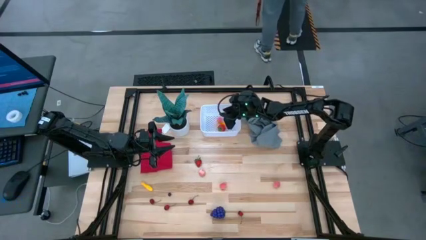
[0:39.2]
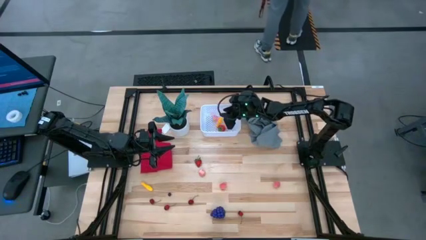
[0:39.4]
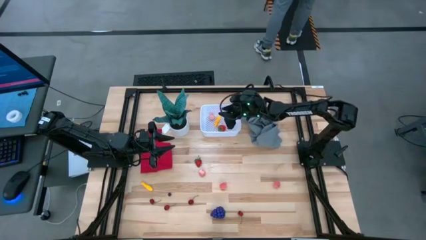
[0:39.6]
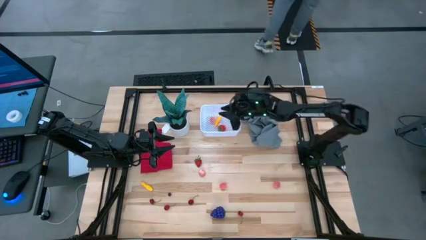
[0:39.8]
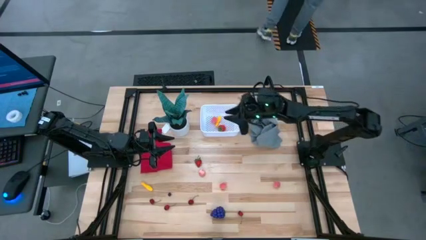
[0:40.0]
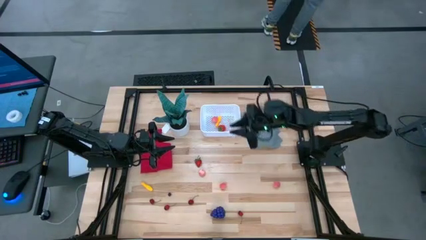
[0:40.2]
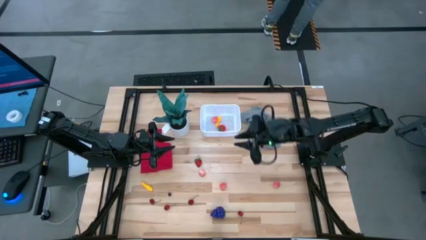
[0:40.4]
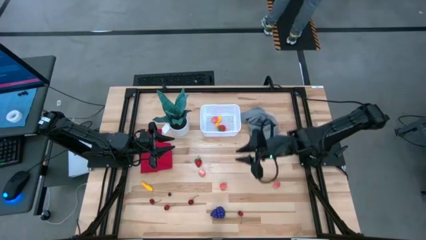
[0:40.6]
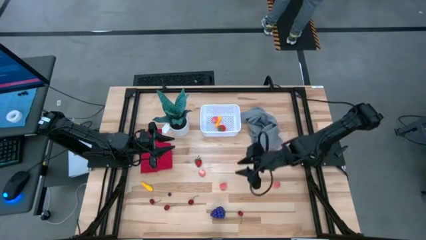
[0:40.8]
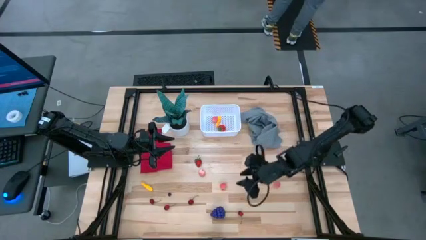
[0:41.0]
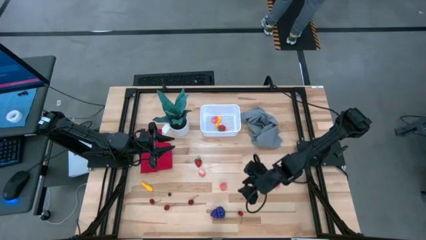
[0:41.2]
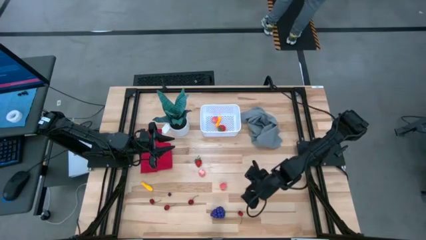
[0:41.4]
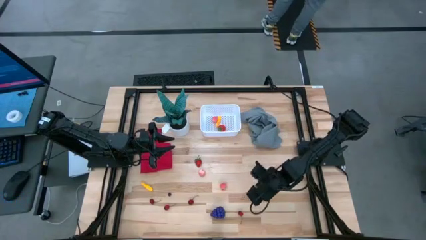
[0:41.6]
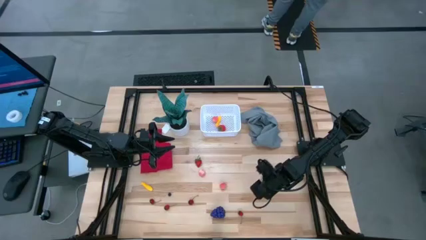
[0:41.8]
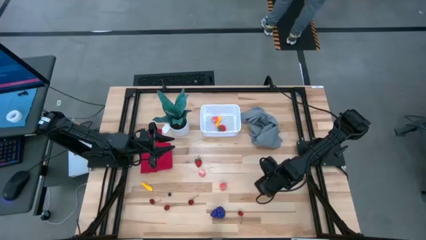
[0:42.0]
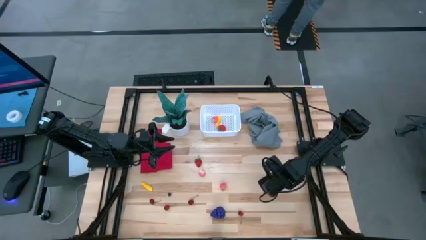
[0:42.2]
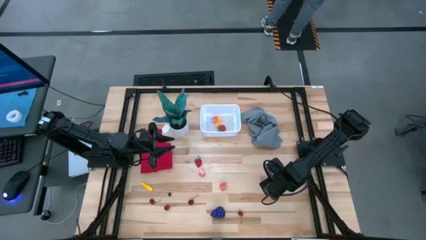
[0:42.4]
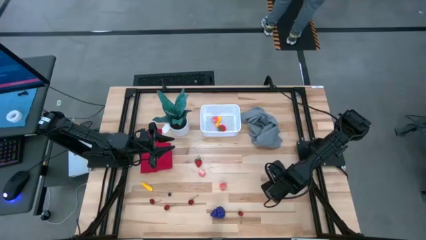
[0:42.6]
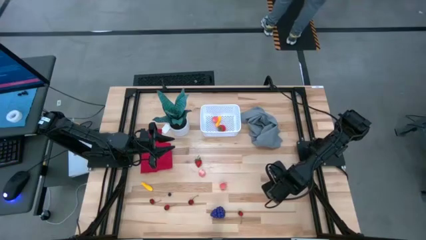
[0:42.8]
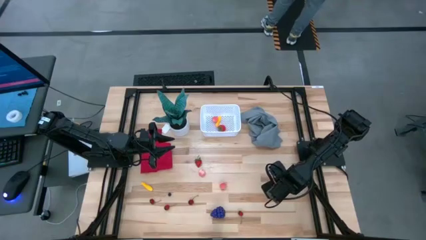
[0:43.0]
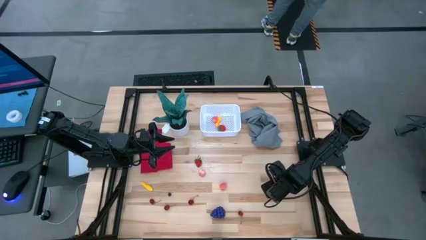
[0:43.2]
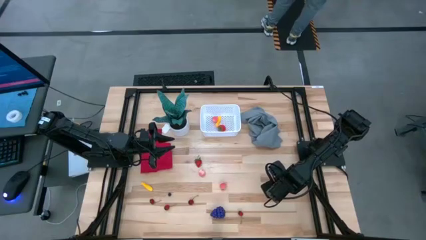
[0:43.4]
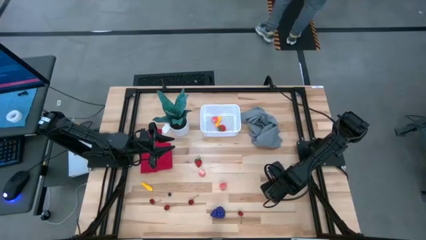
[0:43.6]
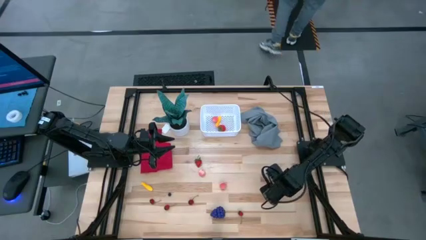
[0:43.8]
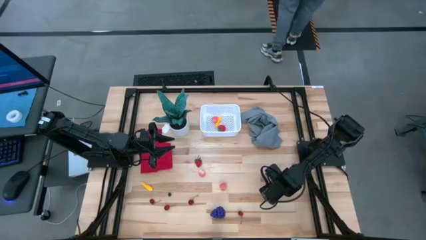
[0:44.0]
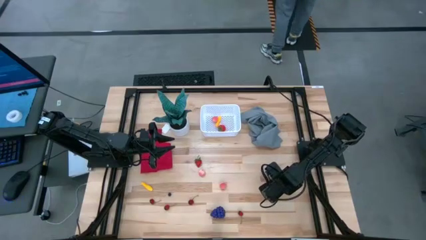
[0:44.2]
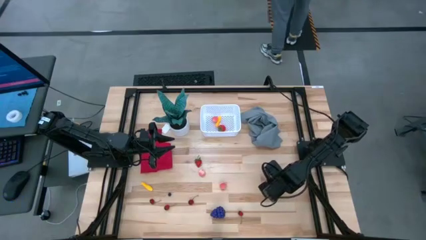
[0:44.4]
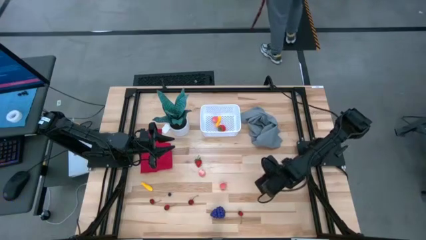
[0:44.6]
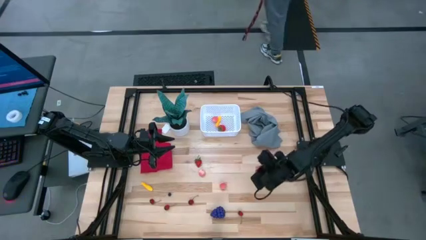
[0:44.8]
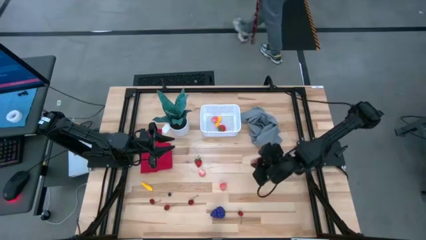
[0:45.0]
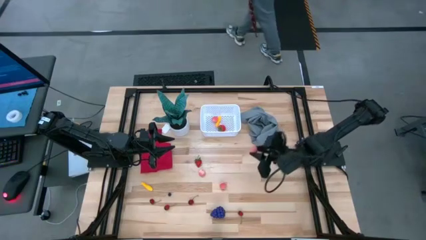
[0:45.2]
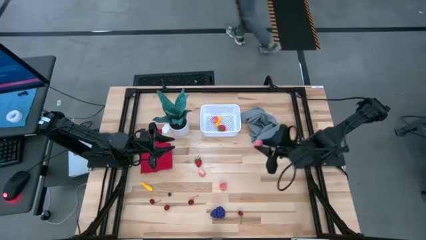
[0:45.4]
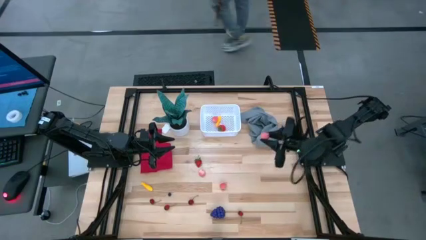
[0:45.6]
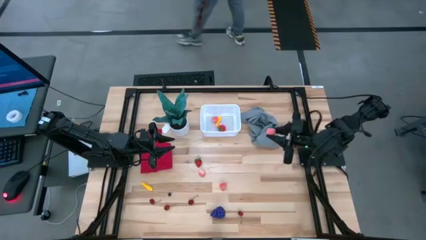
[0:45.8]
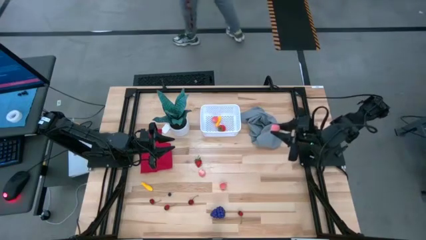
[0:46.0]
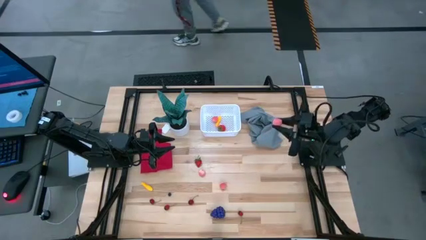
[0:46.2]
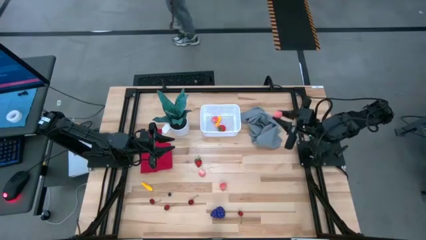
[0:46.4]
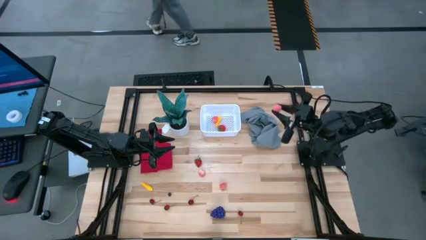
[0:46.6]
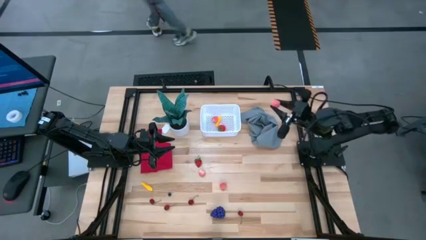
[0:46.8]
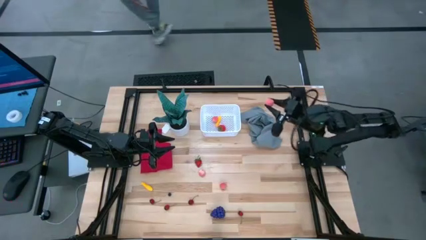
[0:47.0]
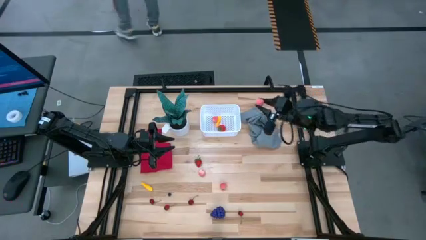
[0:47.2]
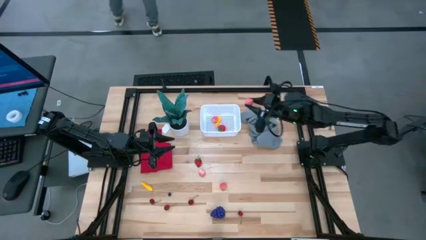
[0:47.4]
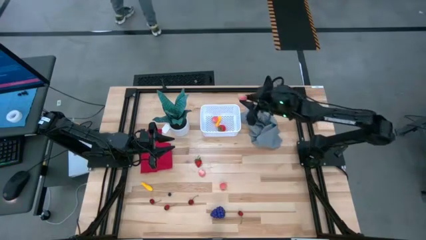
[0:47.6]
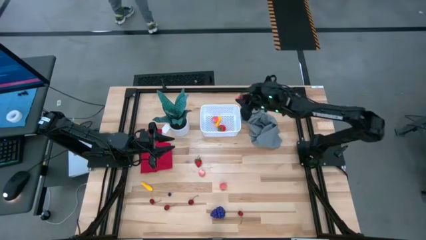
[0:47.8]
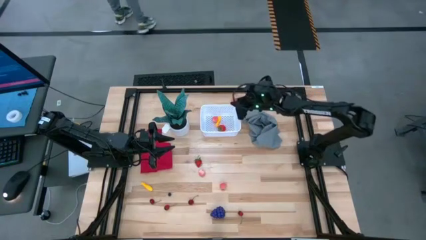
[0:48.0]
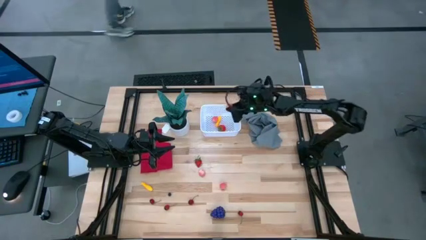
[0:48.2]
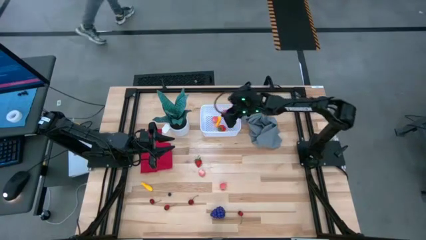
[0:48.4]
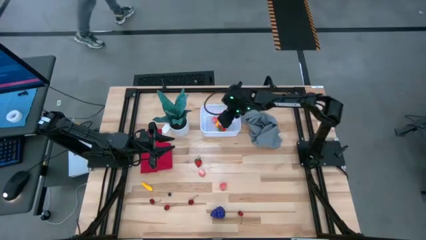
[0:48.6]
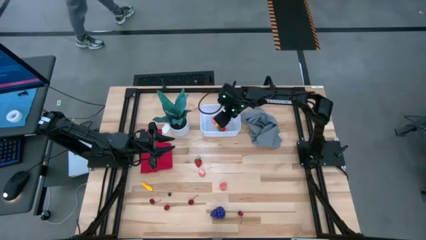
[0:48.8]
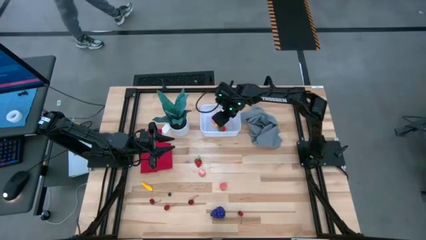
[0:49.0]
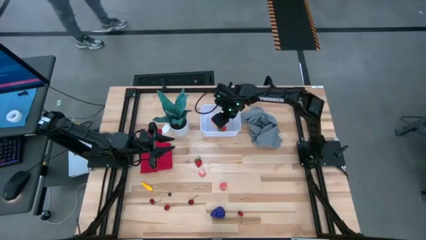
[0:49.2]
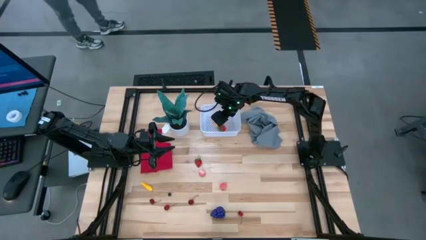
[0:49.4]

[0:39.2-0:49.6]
Task: Pick and placing Produce into tupperware
Put the pink peach into the white bin
